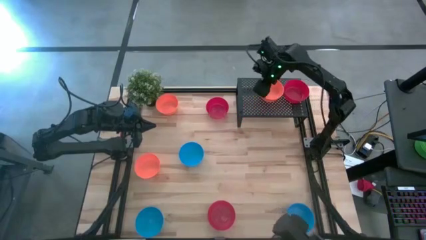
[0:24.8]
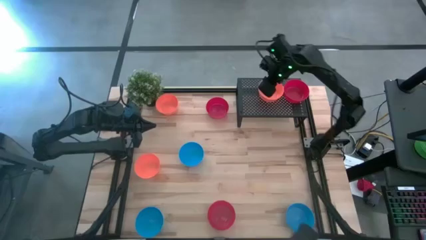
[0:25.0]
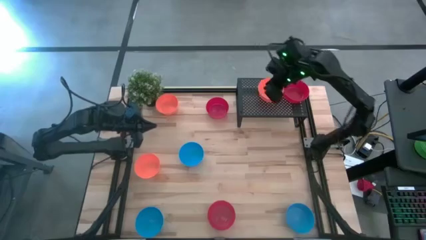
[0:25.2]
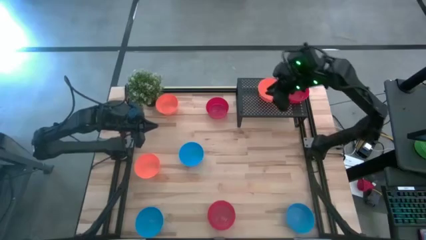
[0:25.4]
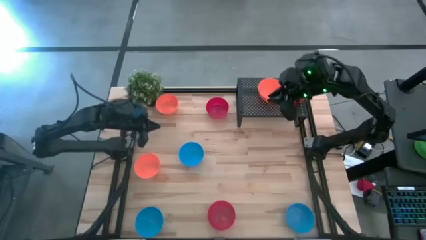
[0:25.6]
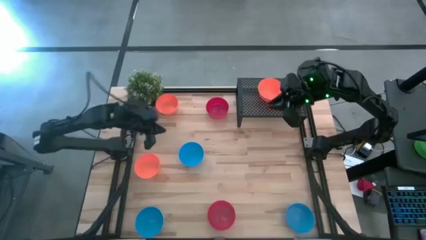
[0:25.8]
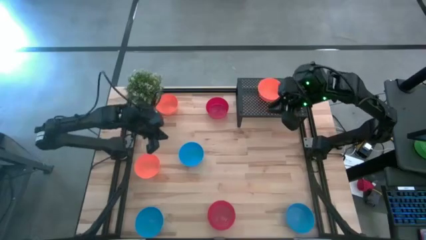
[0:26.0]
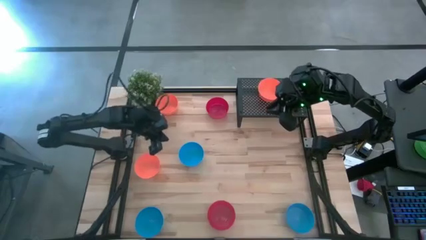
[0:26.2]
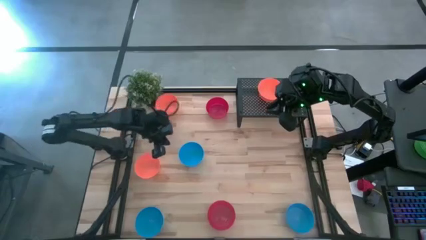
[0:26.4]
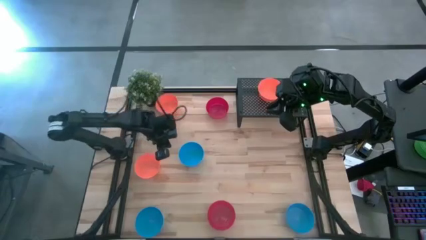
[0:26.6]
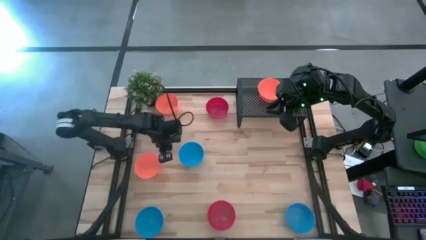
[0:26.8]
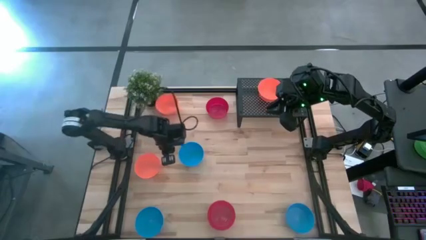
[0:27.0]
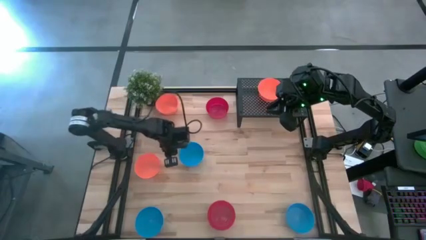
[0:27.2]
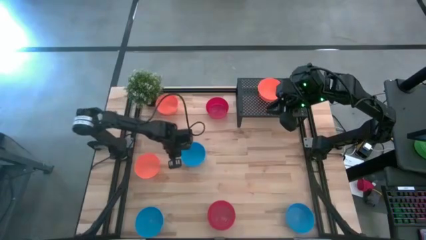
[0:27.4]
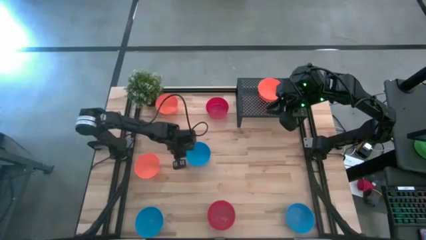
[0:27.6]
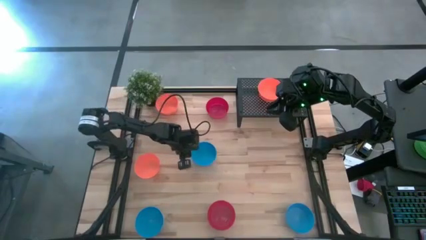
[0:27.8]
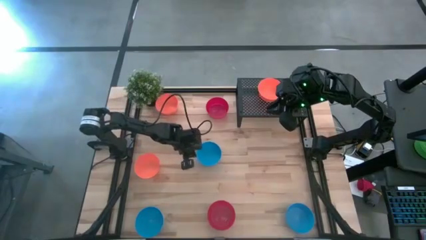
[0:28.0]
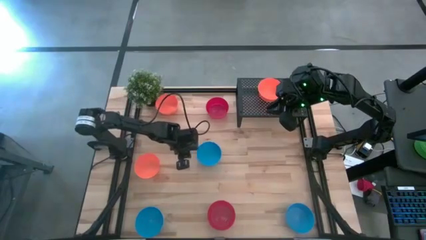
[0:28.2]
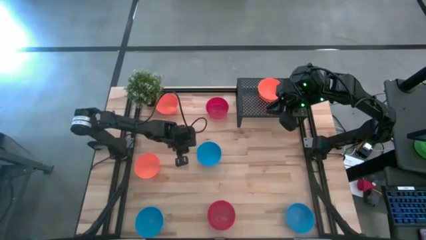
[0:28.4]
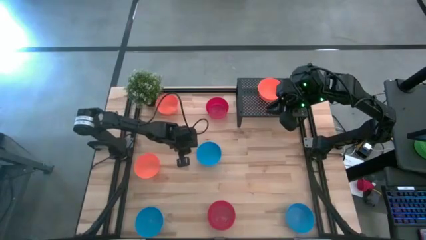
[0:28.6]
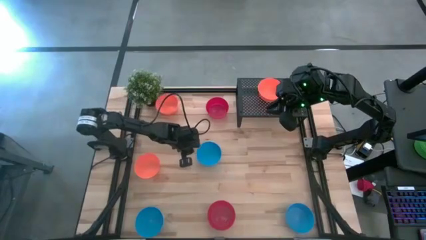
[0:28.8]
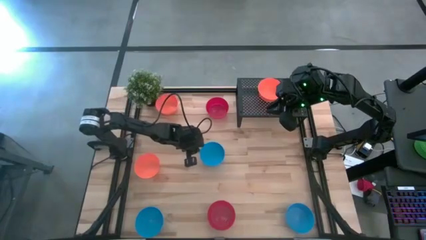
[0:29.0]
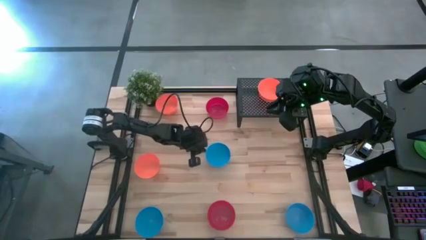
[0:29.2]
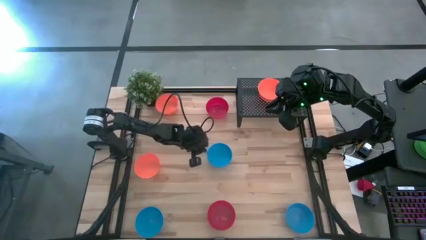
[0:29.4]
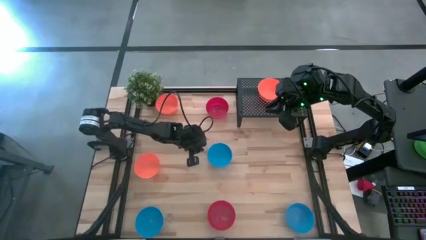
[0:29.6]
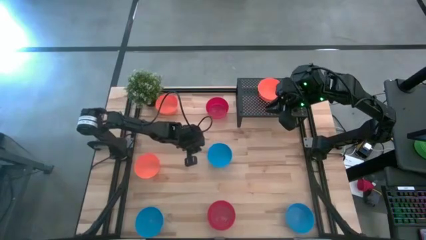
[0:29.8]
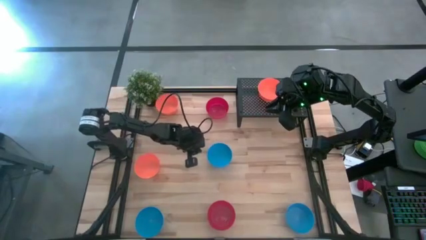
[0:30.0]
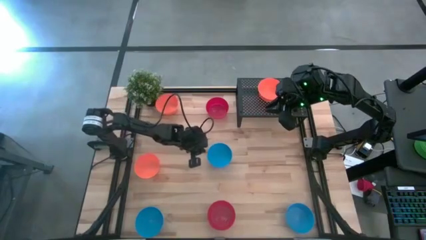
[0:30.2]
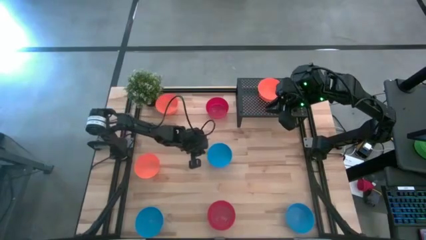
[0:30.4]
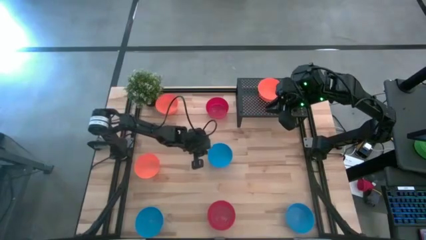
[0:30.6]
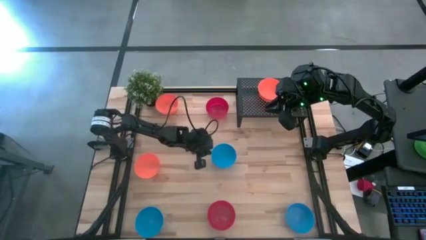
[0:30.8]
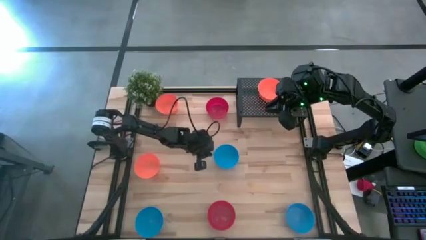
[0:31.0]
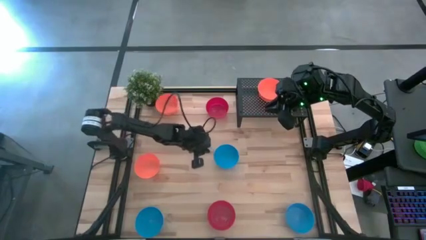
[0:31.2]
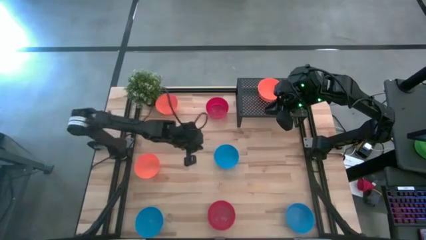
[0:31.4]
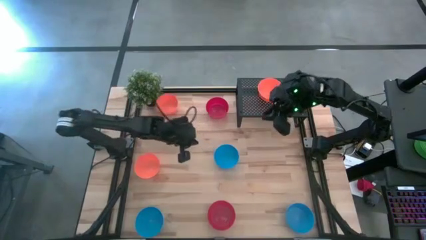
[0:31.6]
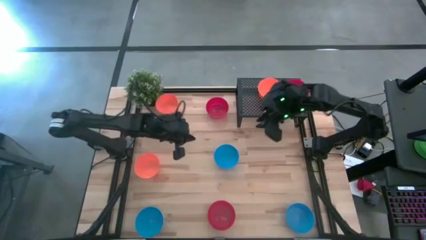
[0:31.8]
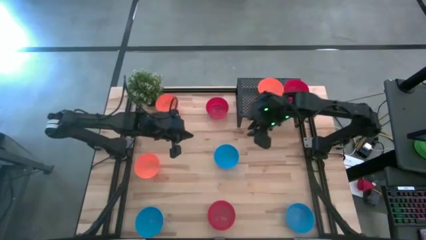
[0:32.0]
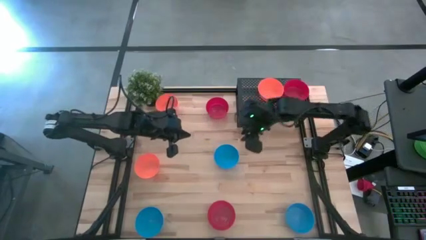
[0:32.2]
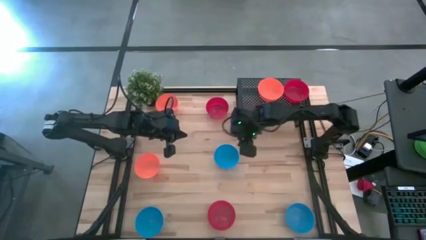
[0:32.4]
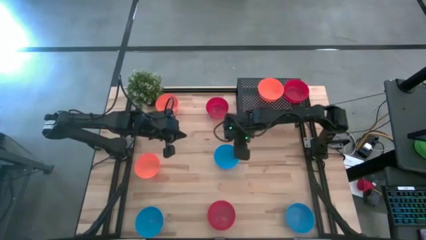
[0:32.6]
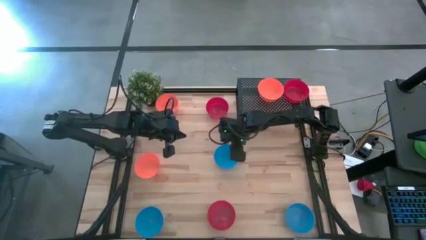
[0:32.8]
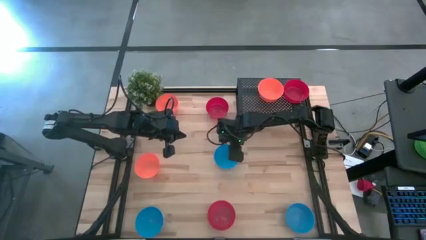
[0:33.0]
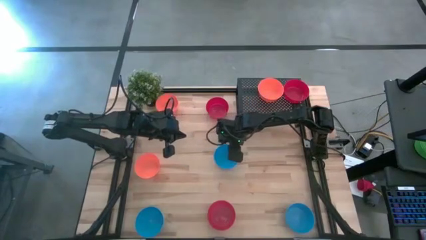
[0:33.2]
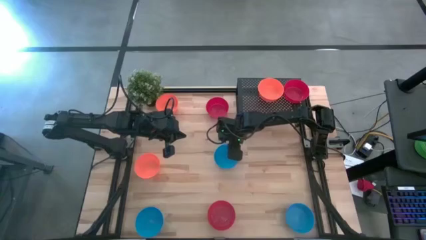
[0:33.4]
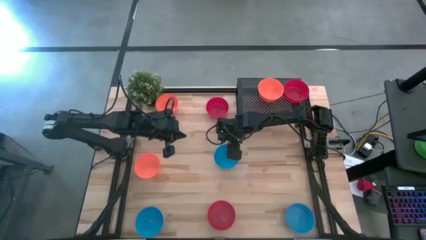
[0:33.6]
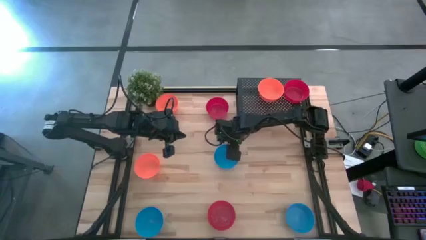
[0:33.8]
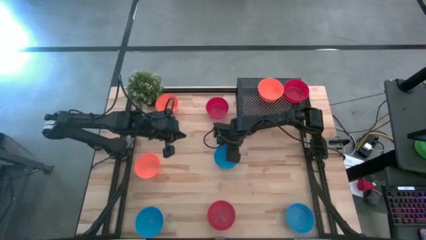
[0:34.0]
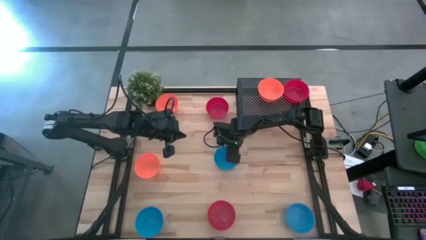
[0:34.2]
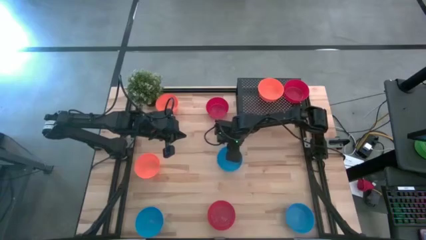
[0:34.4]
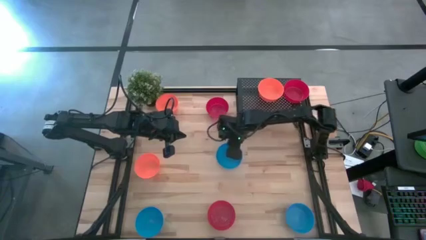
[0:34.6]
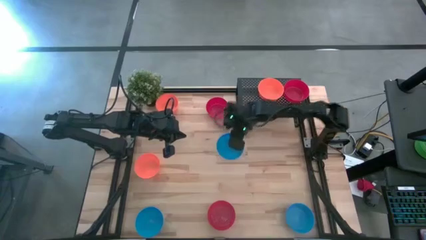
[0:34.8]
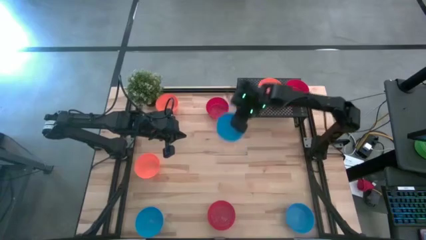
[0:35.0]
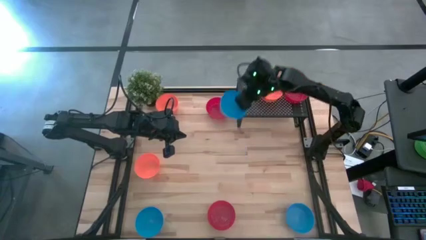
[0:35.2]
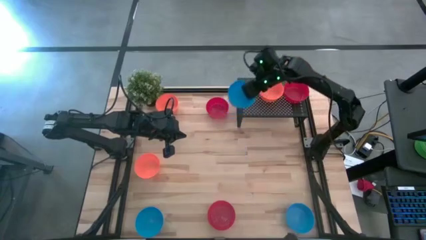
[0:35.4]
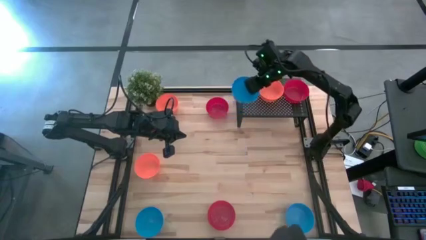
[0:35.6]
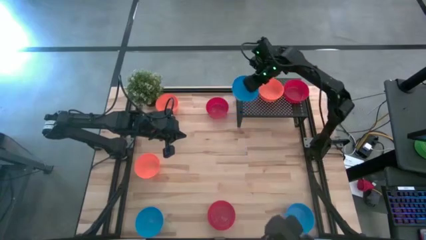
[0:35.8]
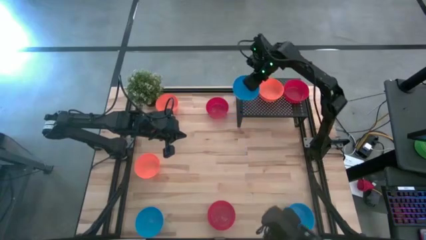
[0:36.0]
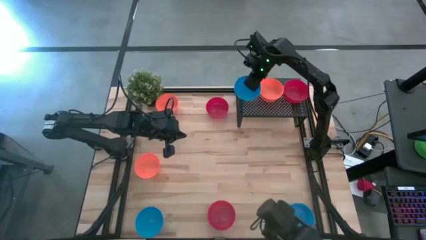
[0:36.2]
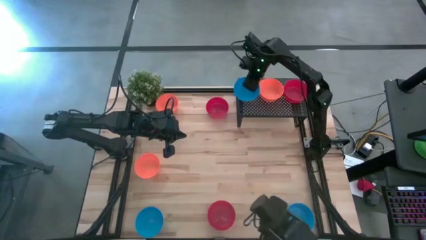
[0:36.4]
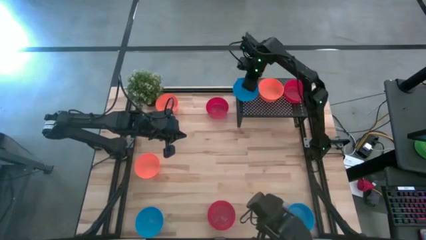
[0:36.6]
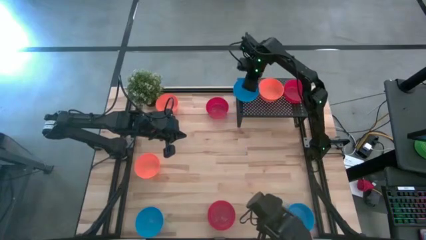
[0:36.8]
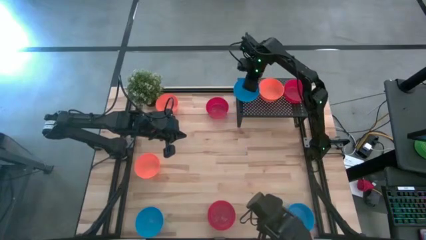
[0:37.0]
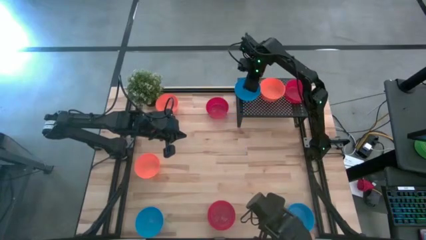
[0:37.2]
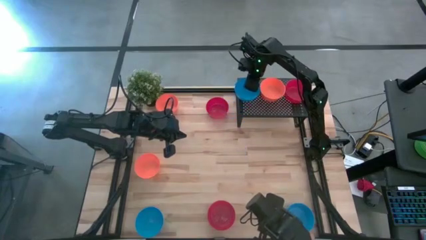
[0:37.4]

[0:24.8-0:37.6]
Task: Pick & Place Mini bowls
Put the top blue bowl on the shelf

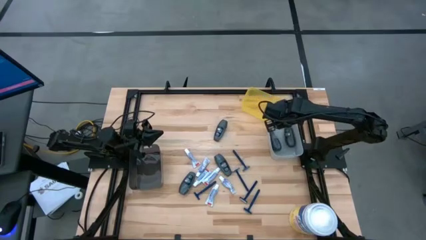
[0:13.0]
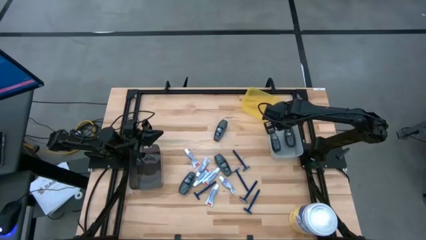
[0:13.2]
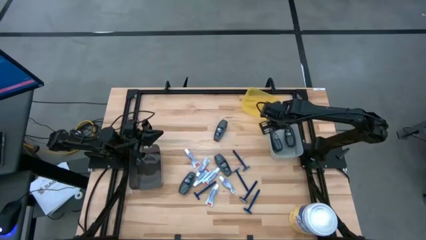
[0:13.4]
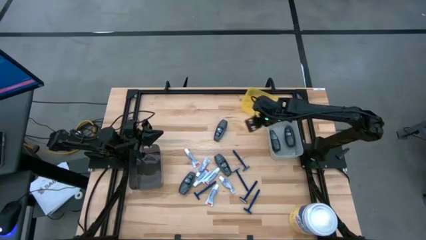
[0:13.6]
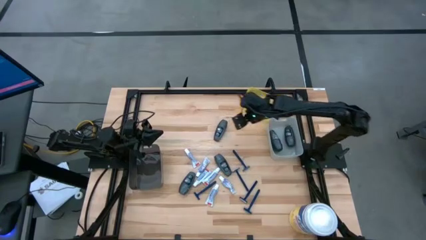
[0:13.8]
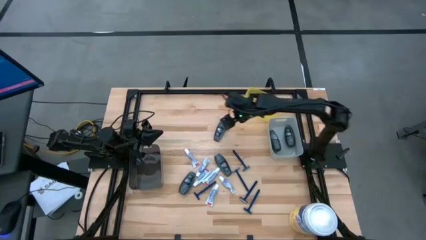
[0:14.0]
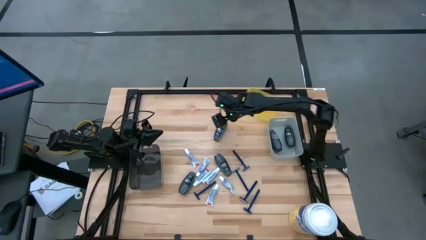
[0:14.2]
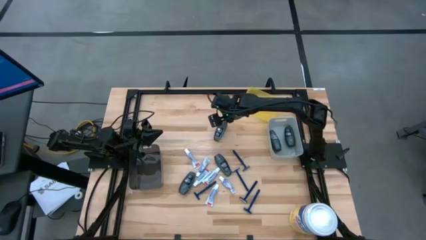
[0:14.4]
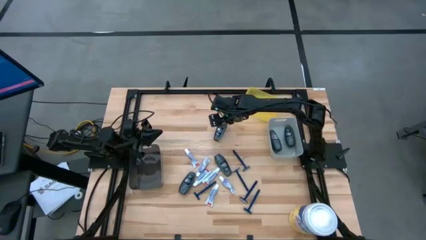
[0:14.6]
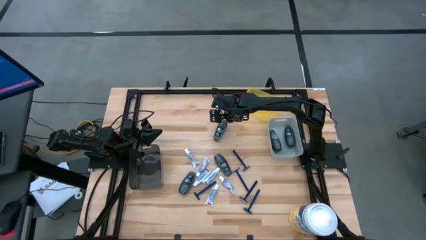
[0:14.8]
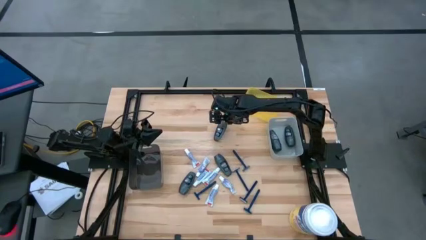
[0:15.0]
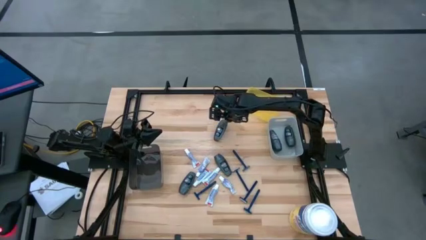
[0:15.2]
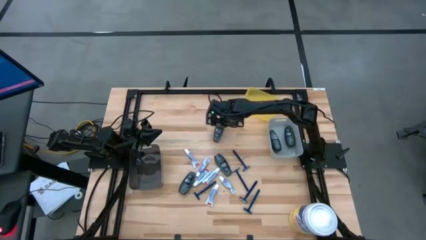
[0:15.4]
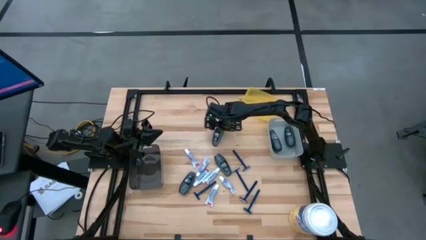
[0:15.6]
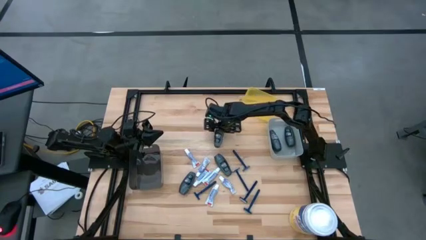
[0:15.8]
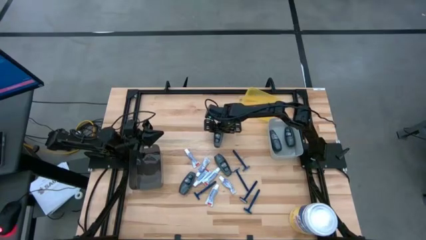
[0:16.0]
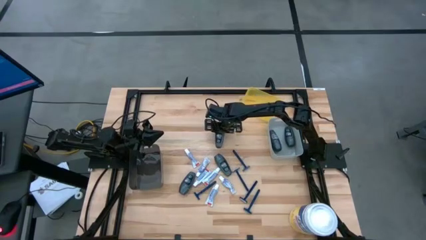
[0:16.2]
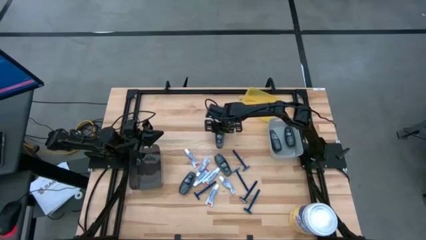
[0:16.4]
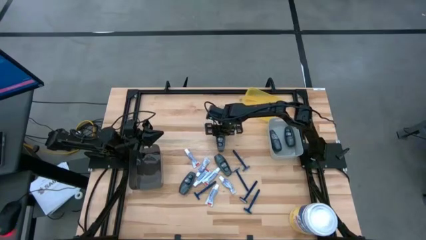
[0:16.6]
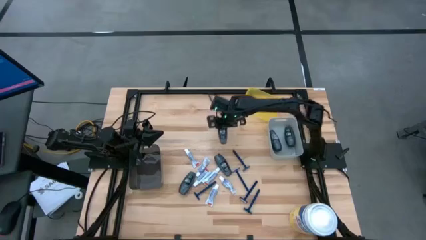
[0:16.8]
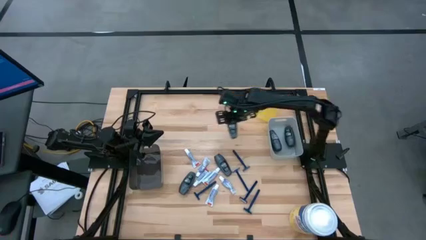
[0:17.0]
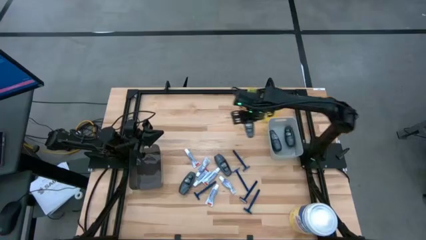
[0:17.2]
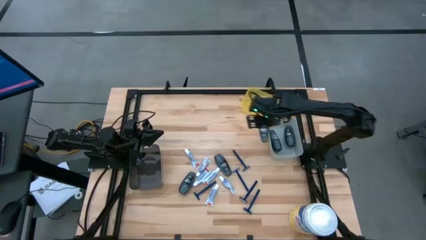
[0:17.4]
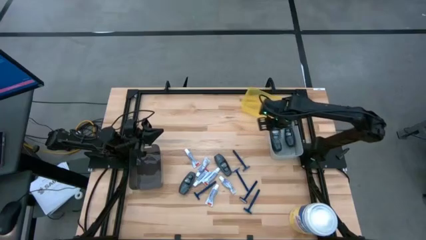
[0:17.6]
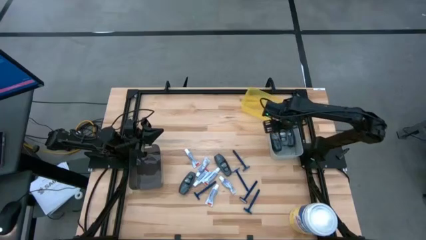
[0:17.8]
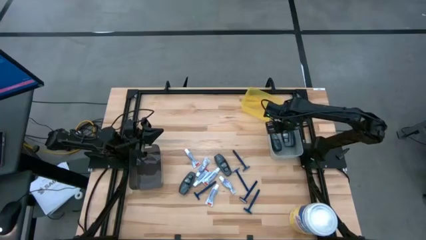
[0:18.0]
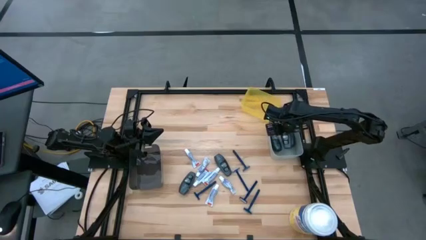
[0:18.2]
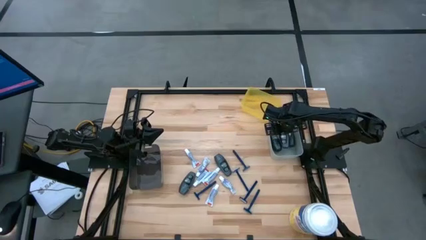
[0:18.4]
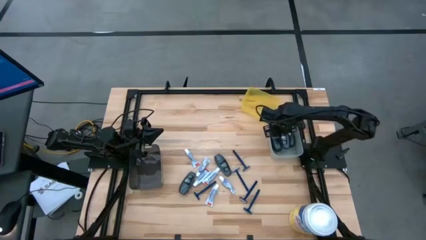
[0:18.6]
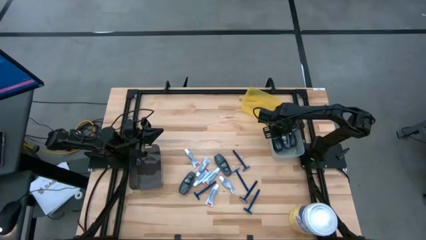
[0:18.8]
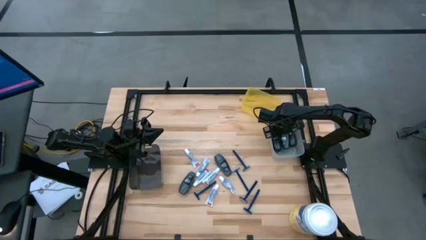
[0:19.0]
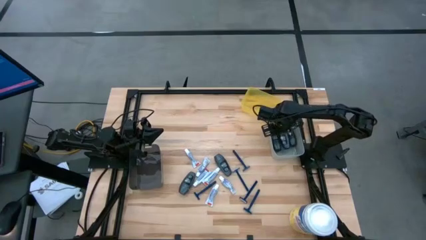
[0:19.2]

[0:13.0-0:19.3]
Task: Pick & Place Travel size toiletries
Put the gray deodorant bottle into the white bin
